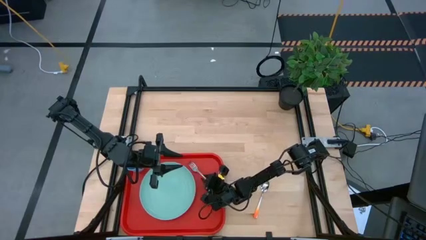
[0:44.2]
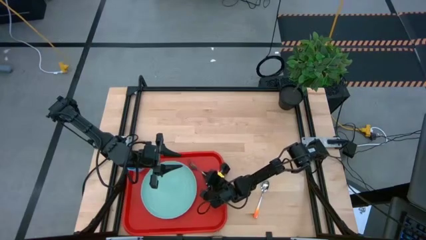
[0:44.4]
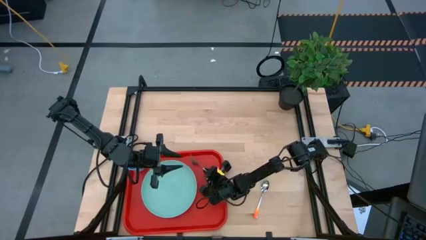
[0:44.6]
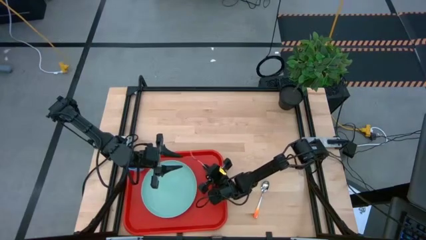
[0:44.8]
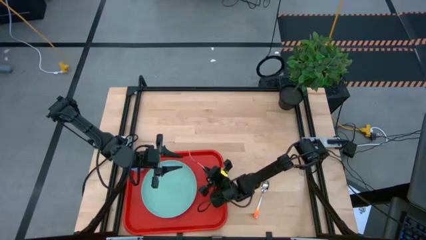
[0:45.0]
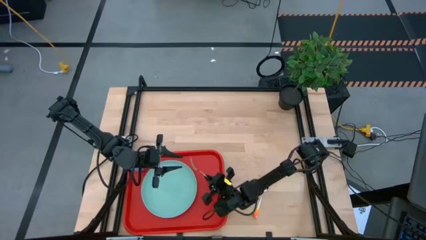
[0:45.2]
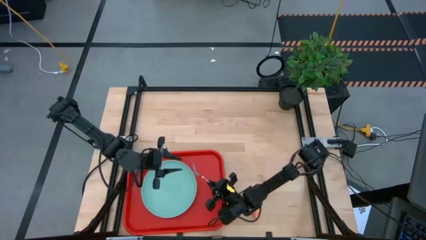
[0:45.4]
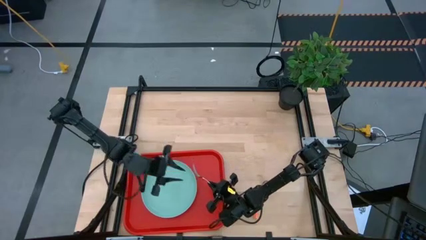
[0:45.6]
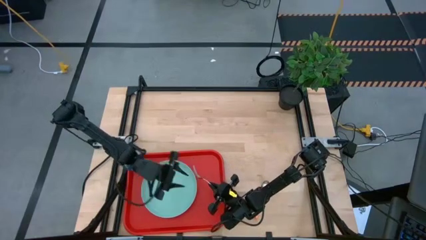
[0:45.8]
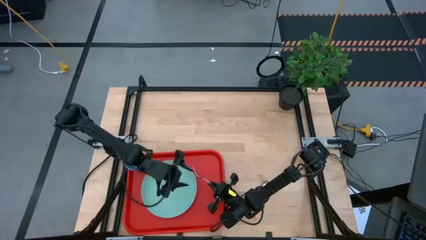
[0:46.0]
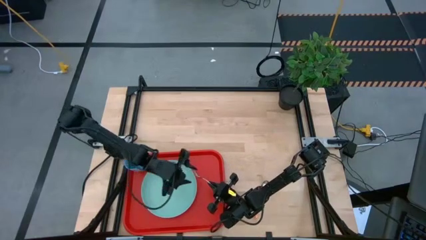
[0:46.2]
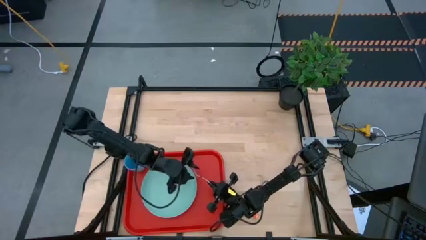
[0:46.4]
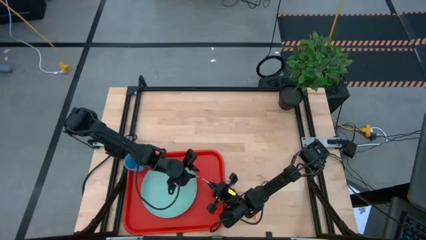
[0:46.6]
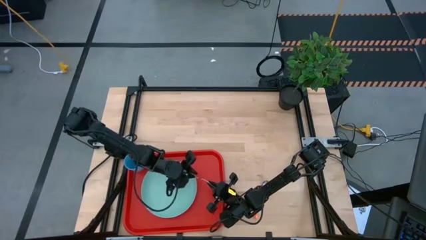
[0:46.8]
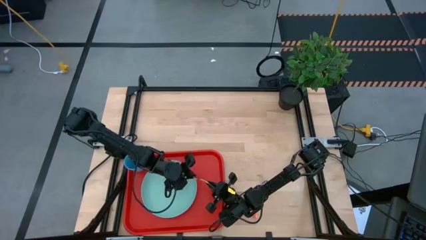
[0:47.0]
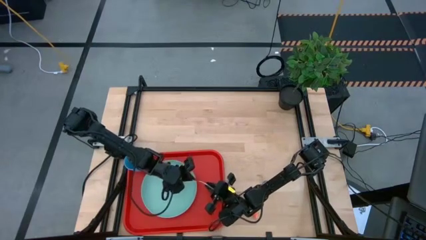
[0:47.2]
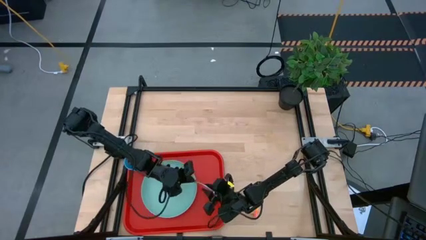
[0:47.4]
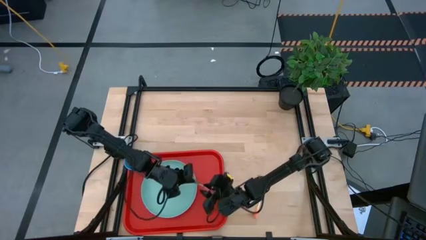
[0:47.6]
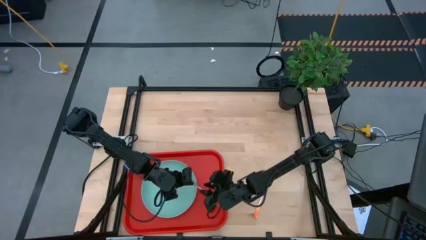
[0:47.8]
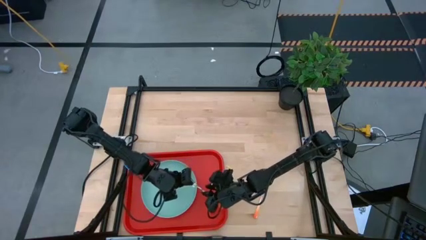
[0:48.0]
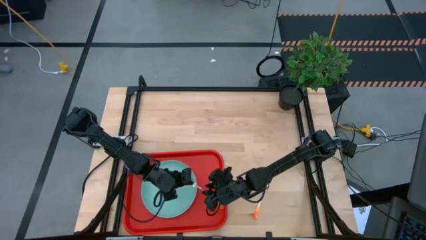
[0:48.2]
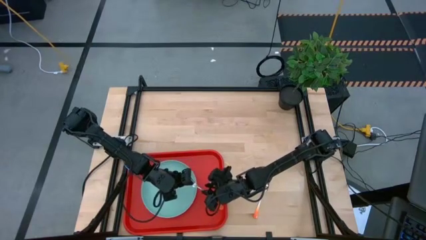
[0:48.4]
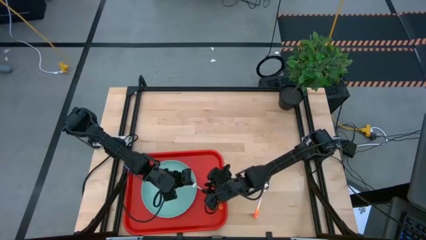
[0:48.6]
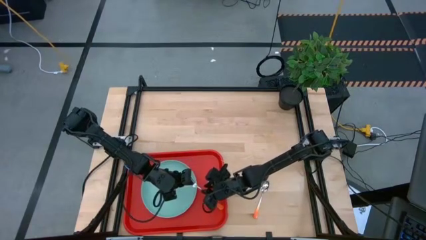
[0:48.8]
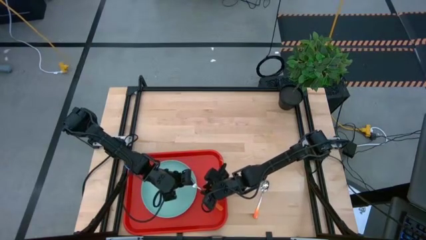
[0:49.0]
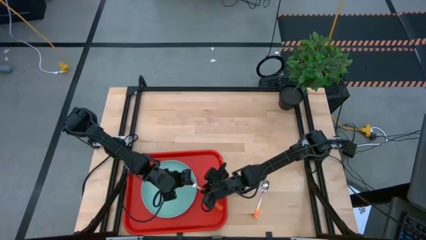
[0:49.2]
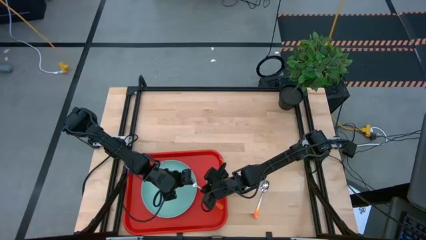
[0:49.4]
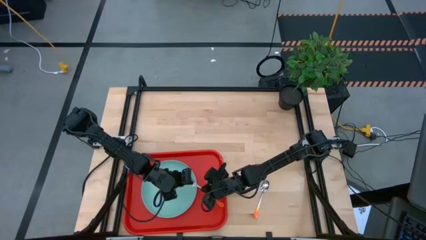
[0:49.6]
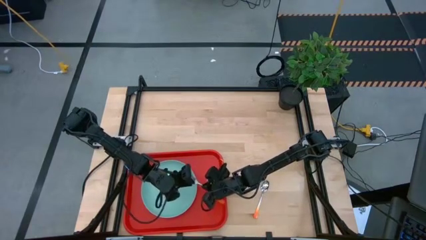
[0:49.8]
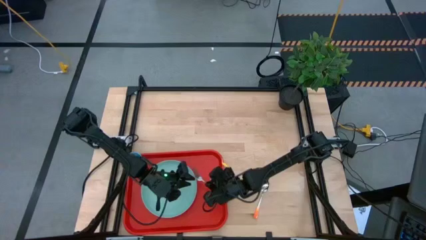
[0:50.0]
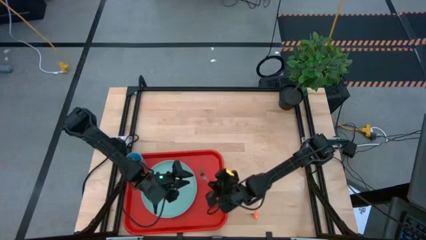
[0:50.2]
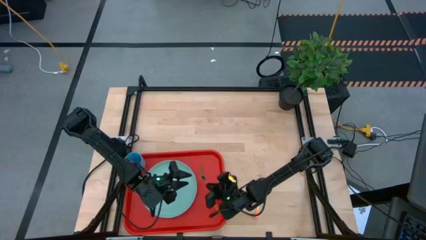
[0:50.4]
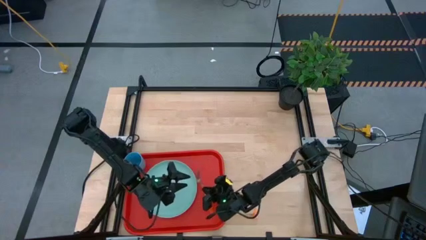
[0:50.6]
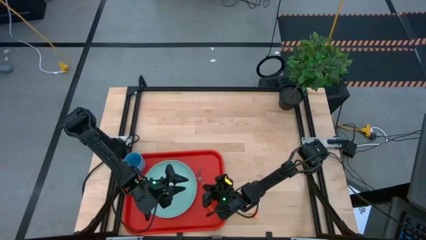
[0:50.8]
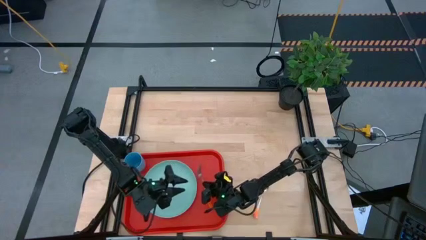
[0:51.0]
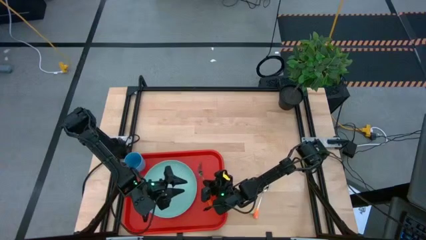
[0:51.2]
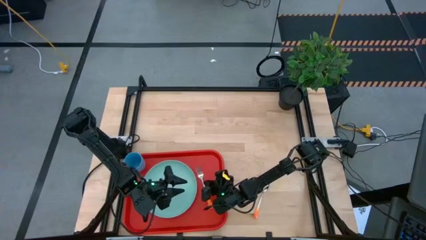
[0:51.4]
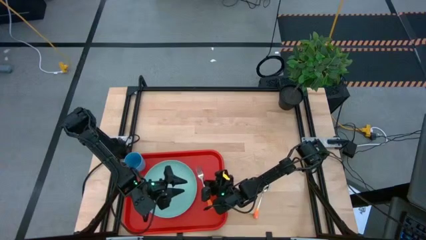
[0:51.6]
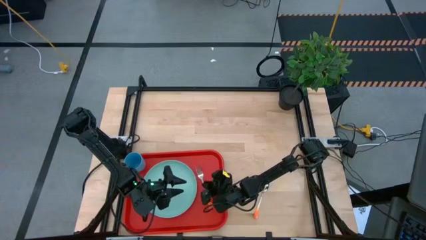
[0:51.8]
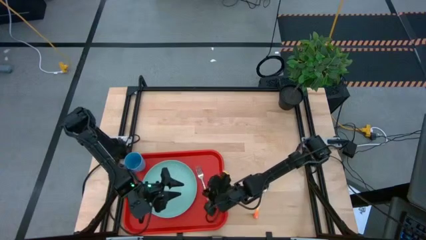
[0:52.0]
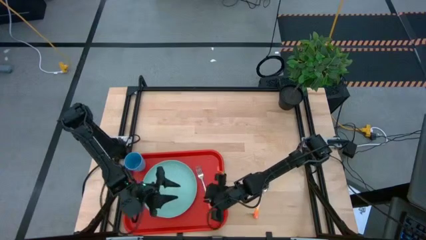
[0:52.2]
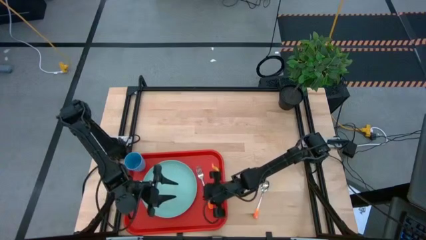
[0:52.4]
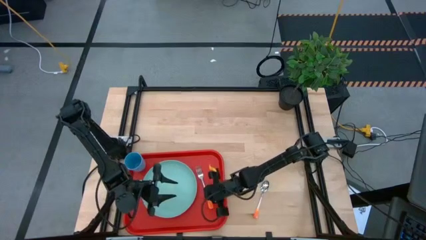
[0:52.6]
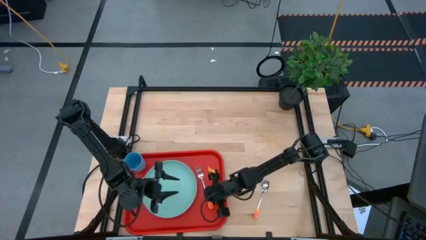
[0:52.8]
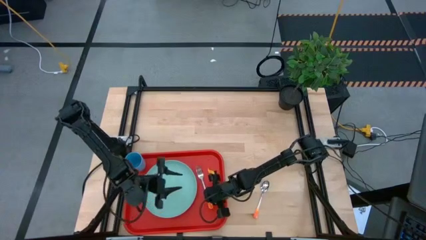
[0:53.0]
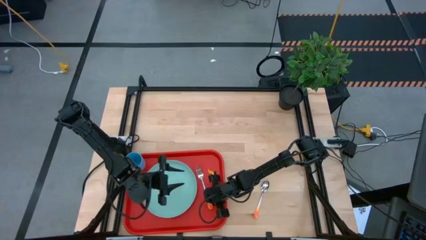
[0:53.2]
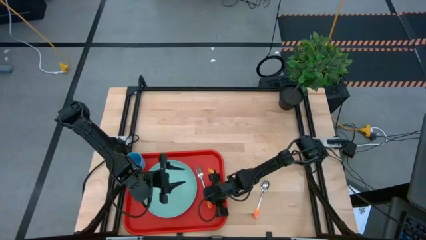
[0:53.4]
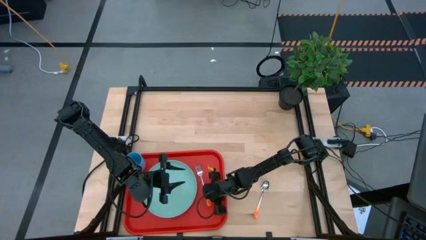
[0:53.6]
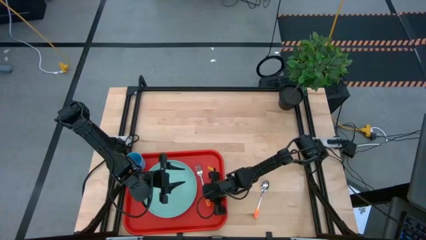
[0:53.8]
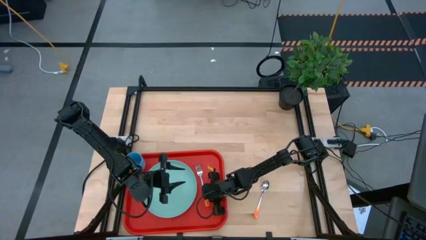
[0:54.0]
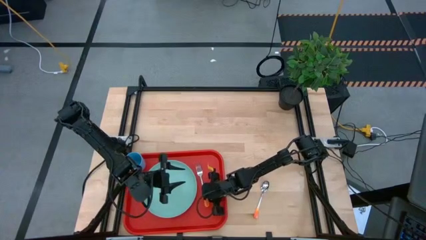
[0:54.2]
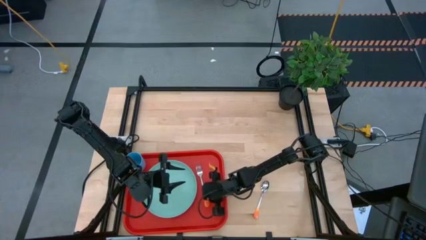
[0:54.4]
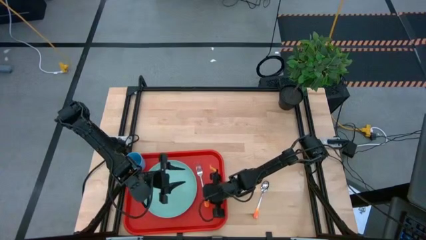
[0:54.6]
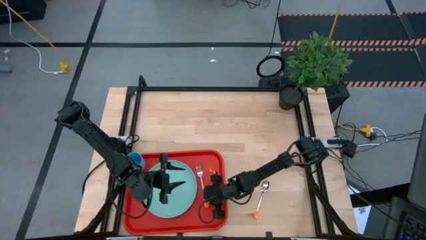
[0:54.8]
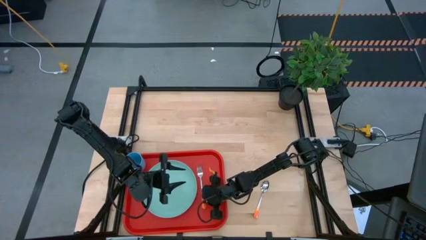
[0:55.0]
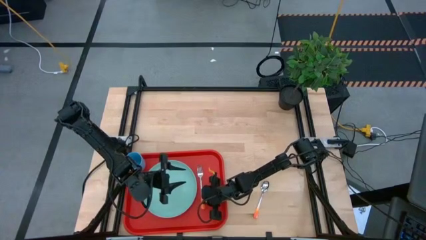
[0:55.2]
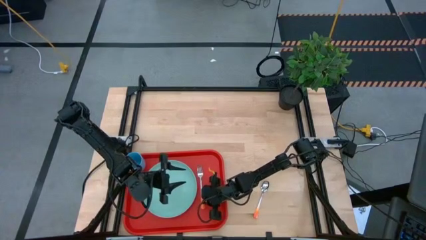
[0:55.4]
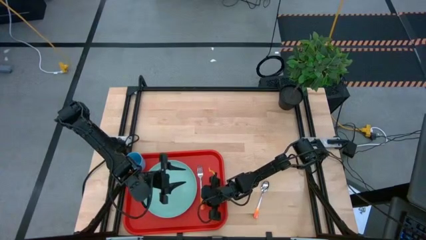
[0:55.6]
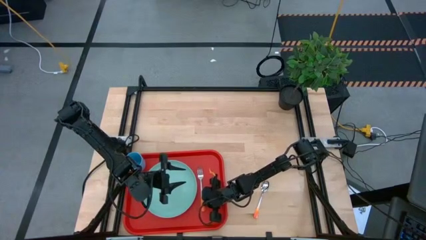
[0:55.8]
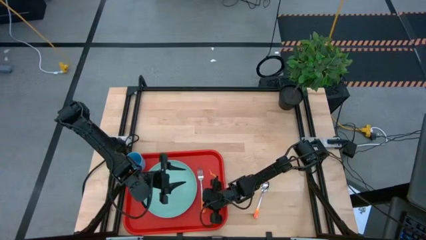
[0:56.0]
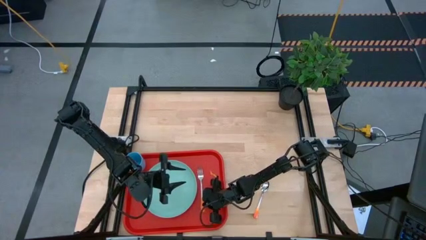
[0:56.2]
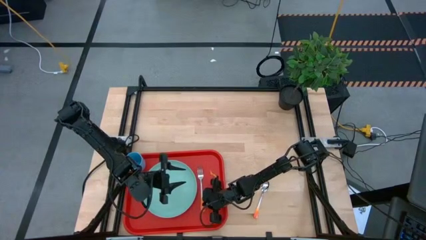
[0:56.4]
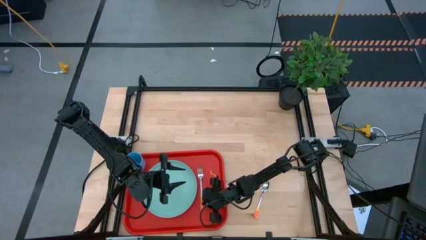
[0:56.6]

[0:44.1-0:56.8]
Task: Pick and place plate/cup/fork/spoon on tray
Put the orange fork on the tray

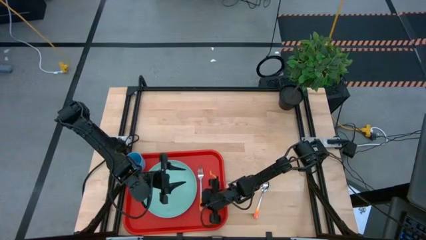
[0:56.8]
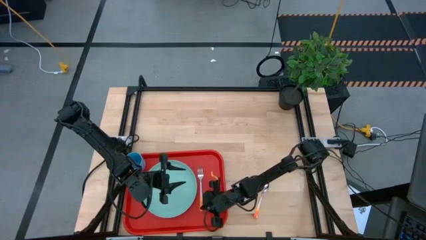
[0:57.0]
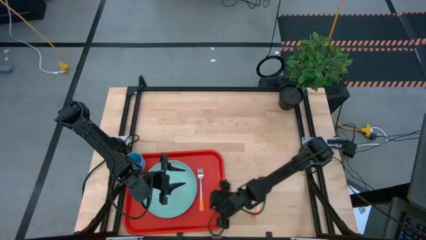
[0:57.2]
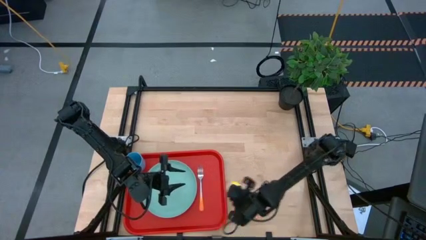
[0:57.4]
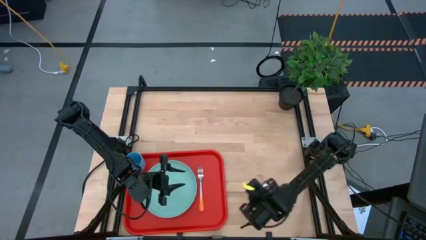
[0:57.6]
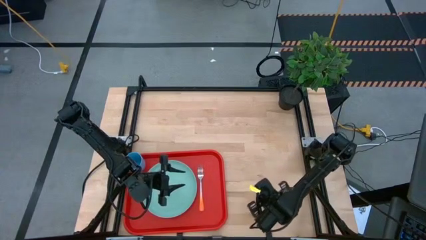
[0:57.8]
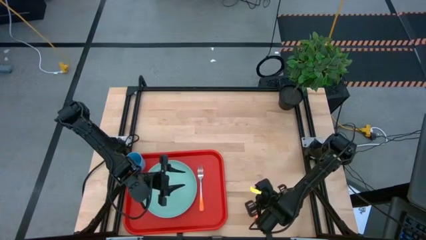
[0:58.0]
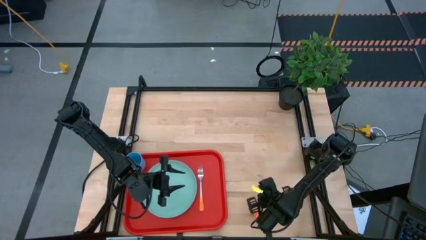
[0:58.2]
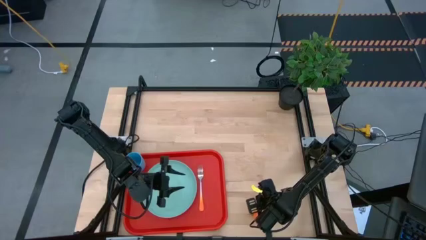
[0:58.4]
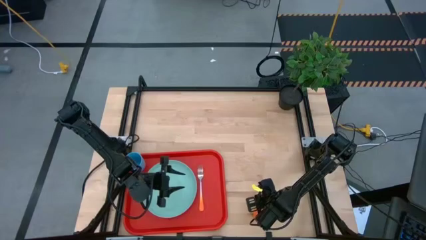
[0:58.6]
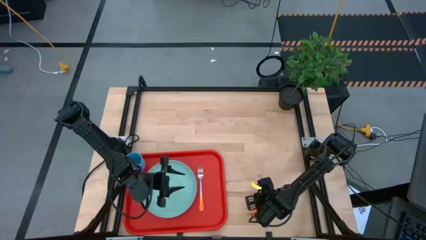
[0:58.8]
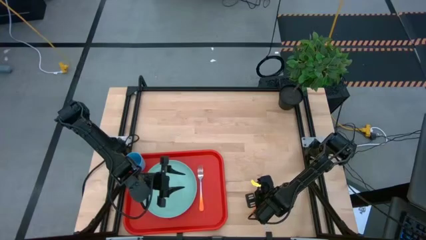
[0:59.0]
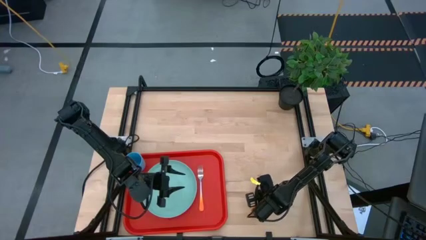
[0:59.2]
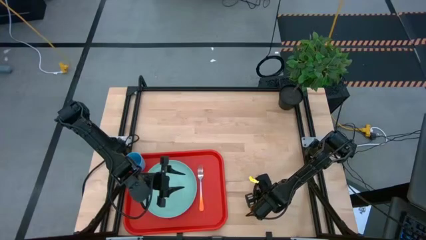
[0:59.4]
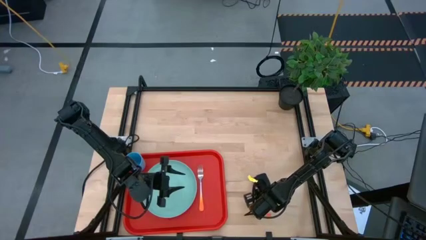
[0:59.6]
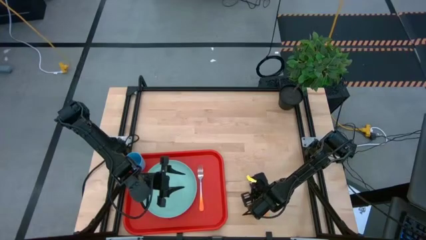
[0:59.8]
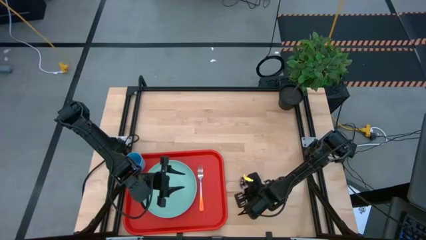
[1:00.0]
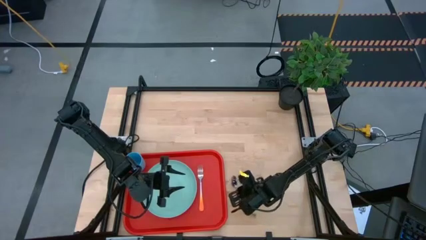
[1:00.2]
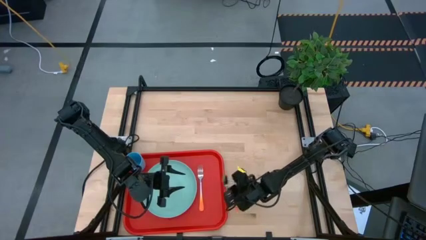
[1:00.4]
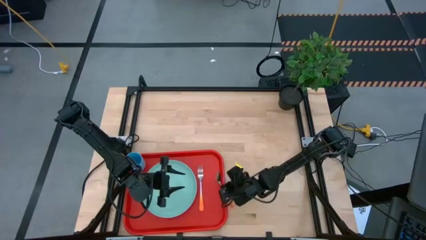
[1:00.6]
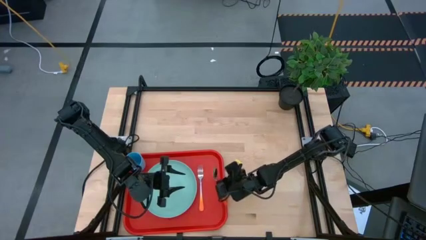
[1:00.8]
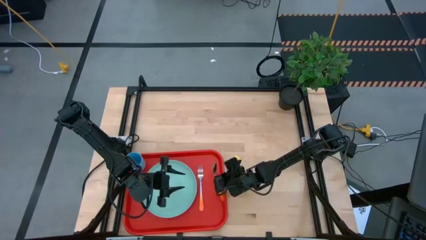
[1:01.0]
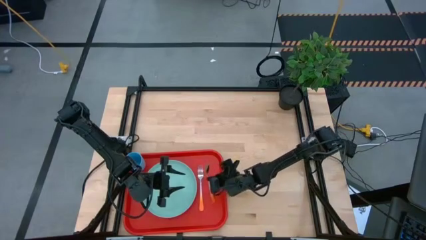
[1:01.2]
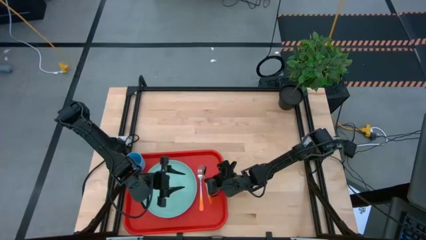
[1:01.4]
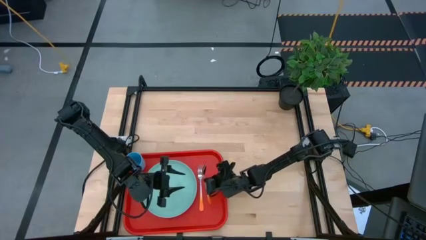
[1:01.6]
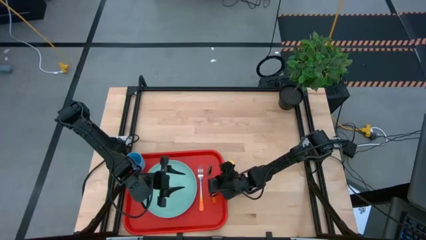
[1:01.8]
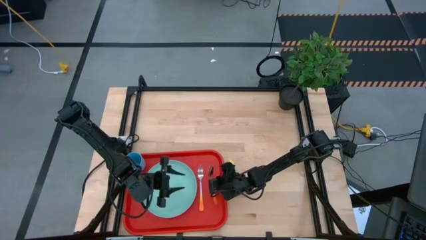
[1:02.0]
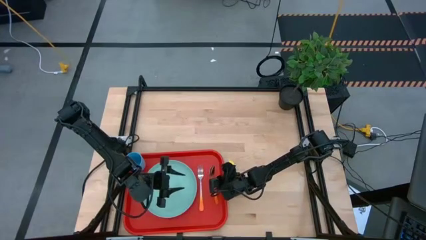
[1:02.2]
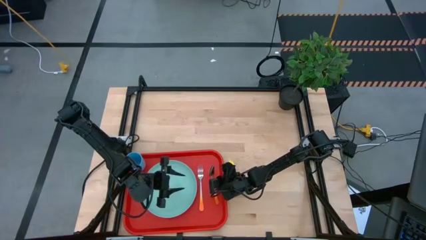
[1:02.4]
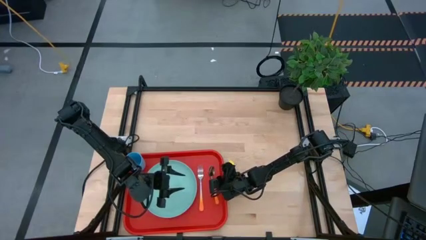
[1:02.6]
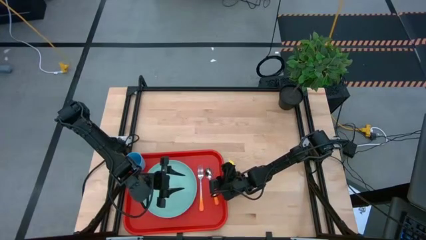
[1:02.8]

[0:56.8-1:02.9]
Put the orange spoon on the tray
